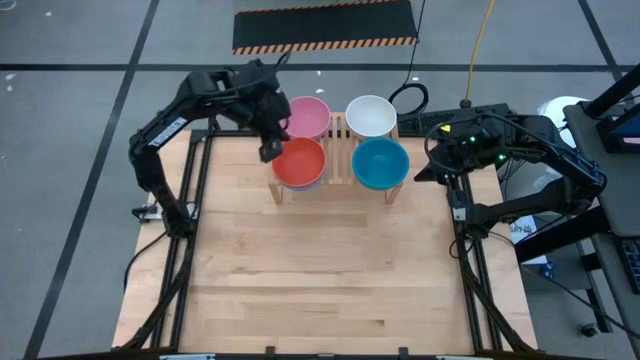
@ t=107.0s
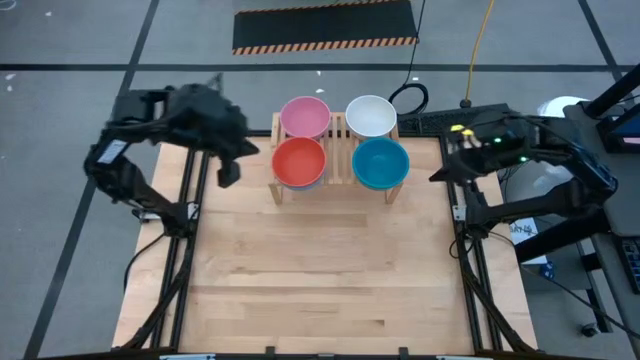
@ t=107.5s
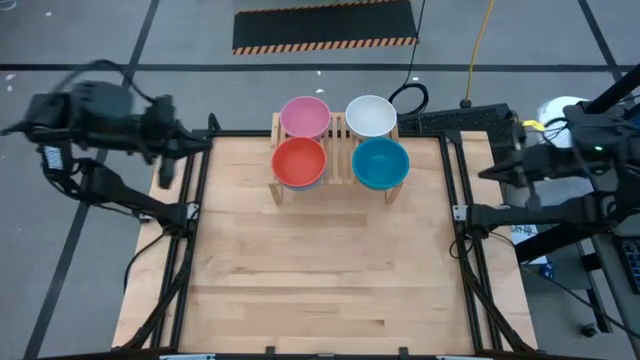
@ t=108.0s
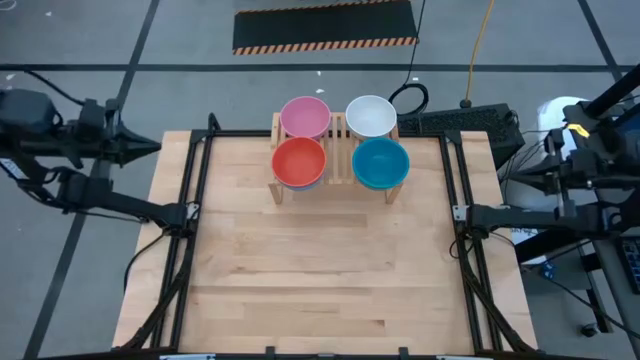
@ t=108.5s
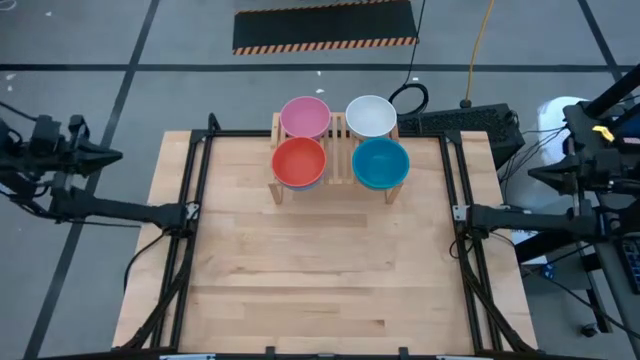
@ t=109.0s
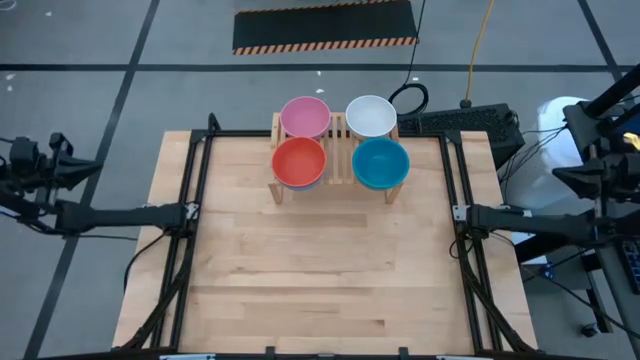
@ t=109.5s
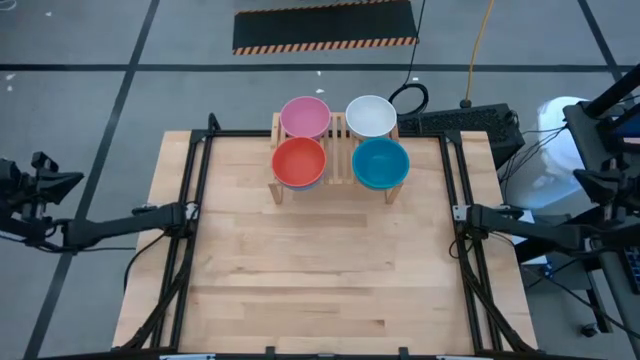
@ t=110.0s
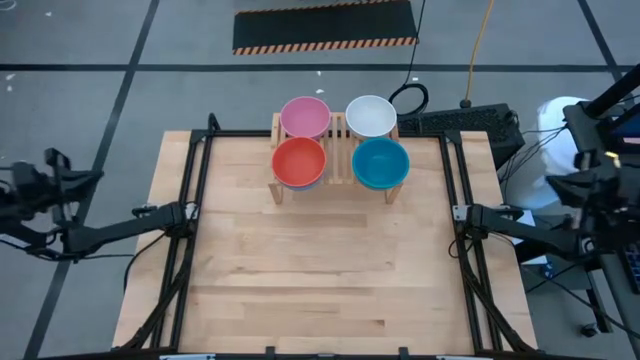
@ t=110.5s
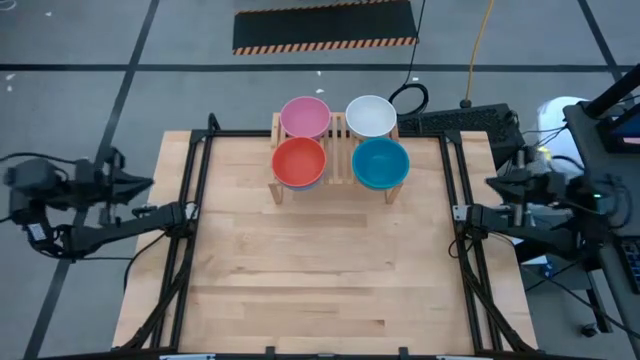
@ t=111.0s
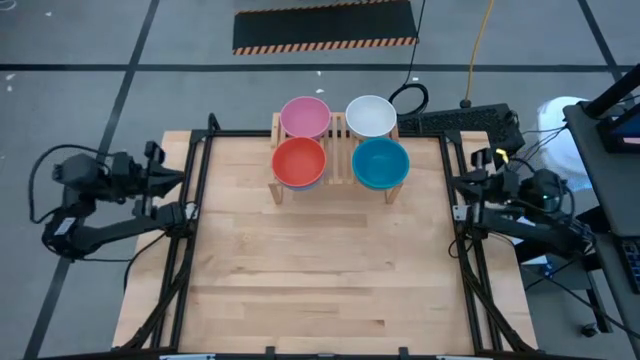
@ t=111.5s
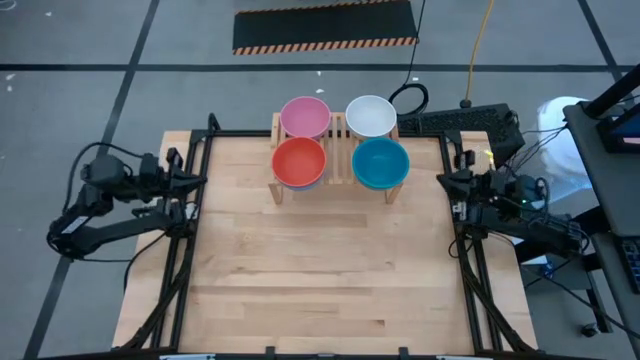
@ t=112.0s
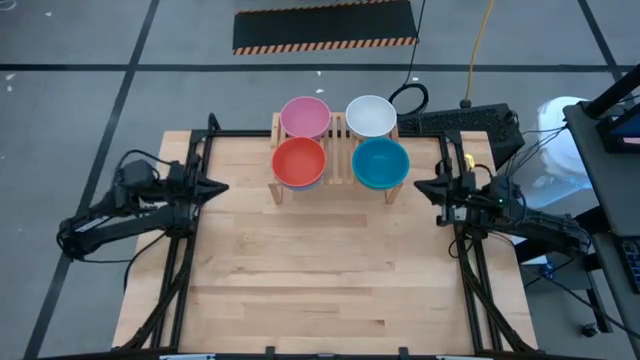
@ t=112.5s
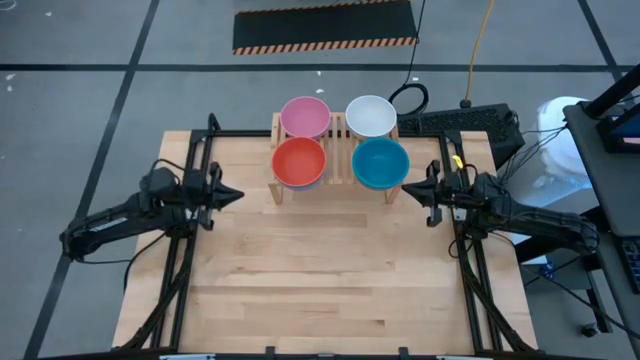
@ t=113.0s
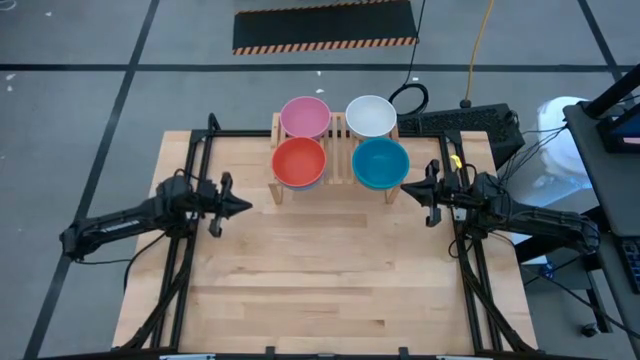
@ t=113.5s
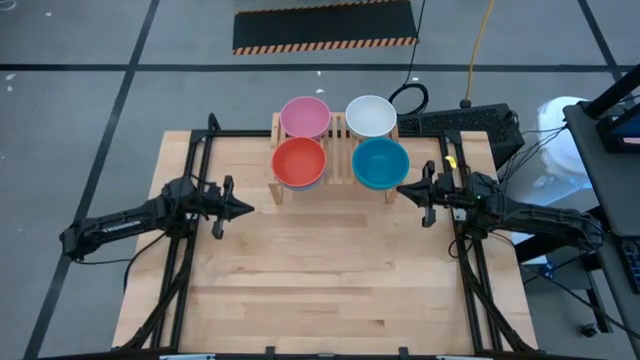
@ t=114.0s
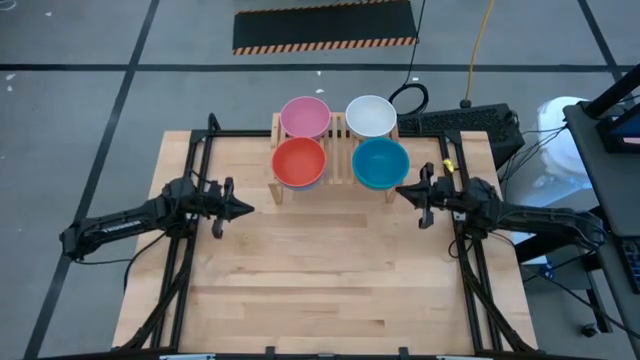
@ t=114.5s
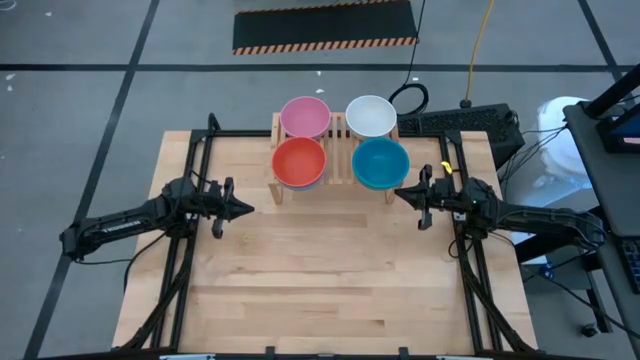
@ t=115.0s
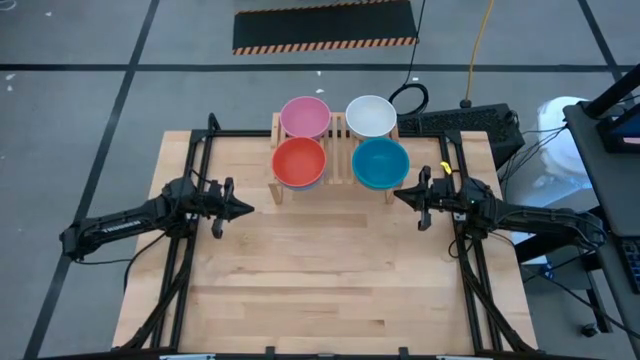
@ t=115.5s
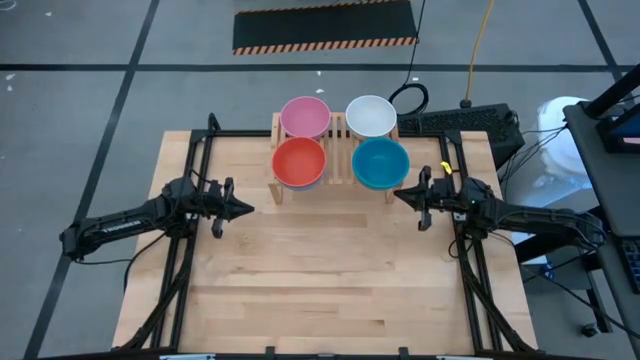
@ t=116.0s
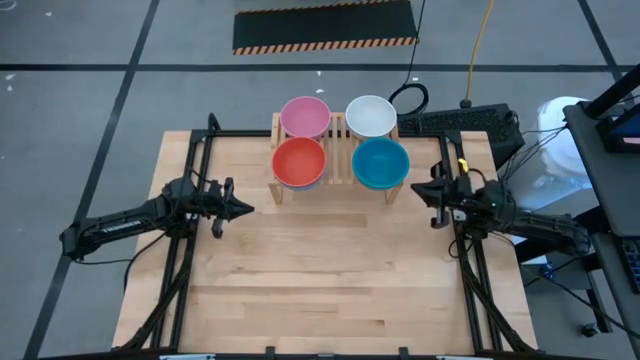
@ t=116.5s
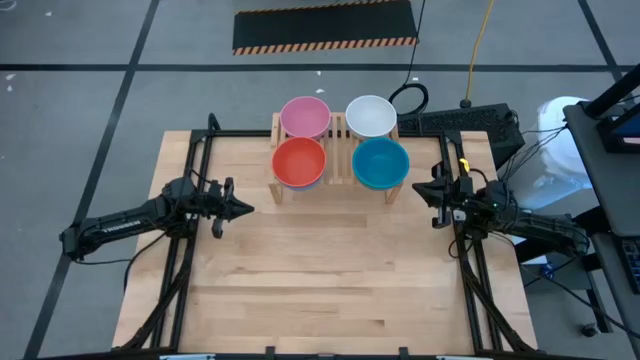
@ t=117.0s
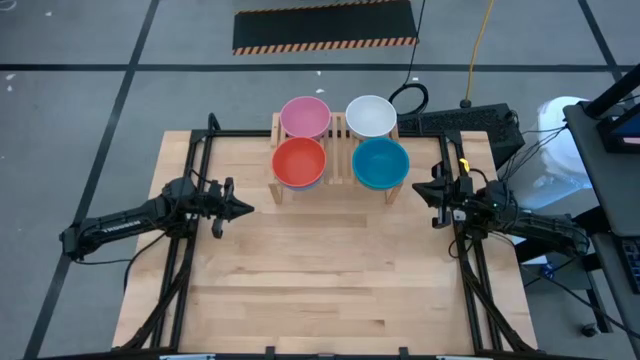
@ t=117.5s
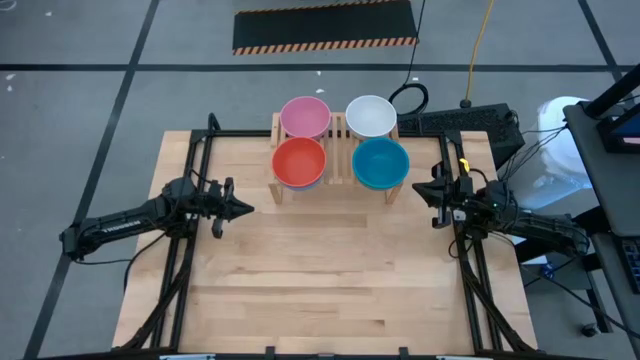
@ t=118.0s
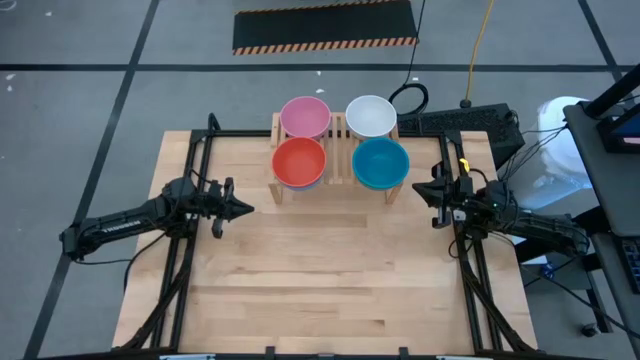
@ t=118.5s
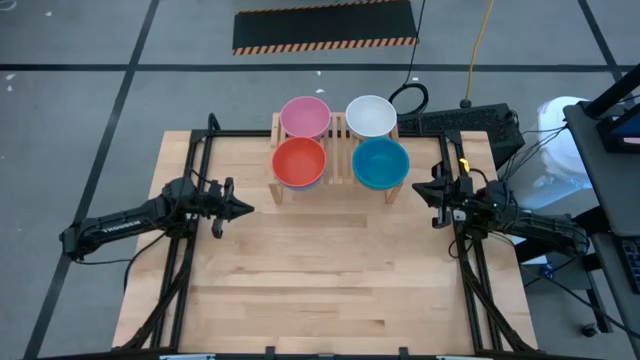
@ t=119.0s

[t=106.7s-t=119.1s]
Task: Place and stack bowls onto a shelf
Return to Home Position

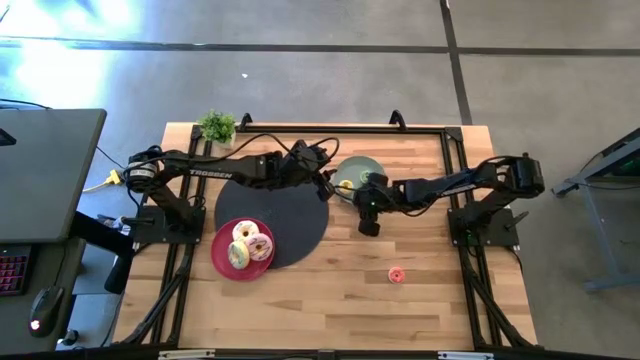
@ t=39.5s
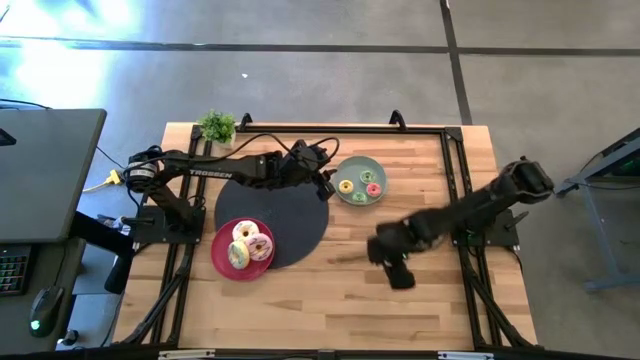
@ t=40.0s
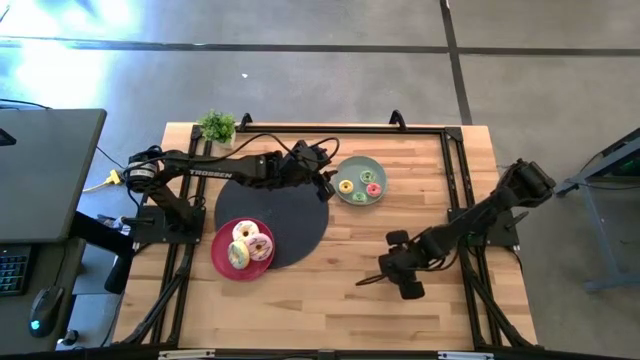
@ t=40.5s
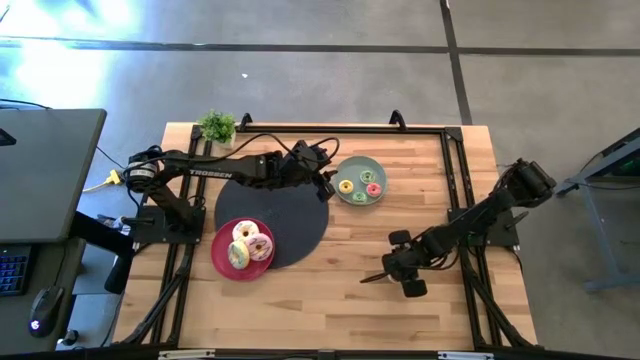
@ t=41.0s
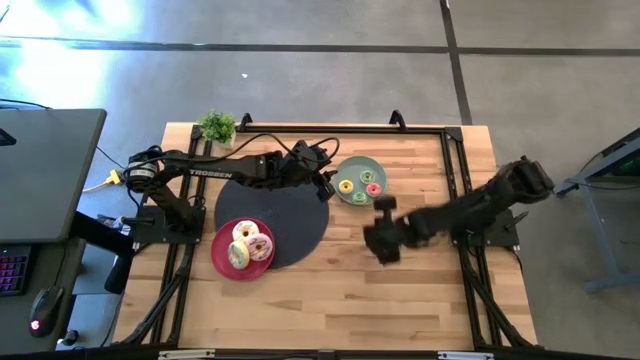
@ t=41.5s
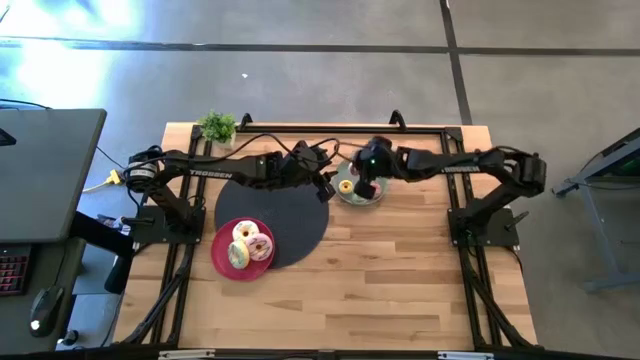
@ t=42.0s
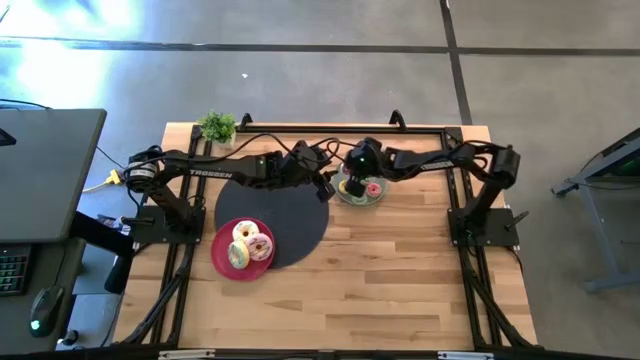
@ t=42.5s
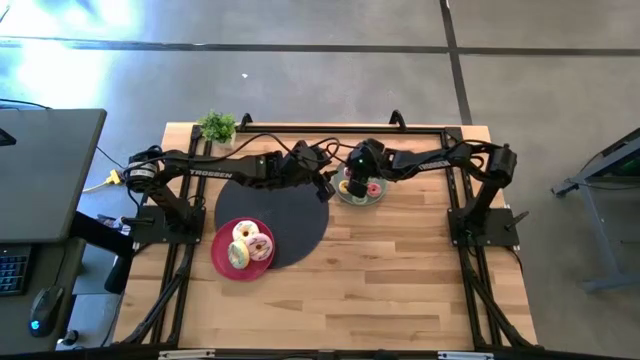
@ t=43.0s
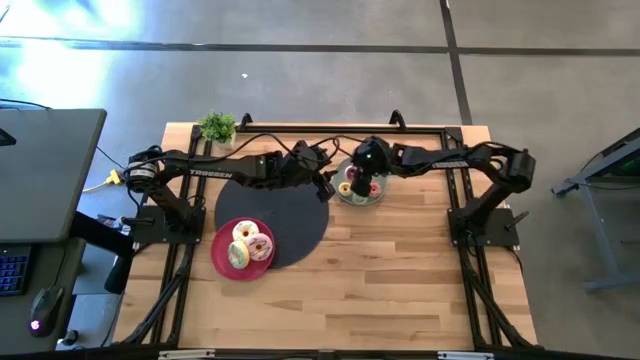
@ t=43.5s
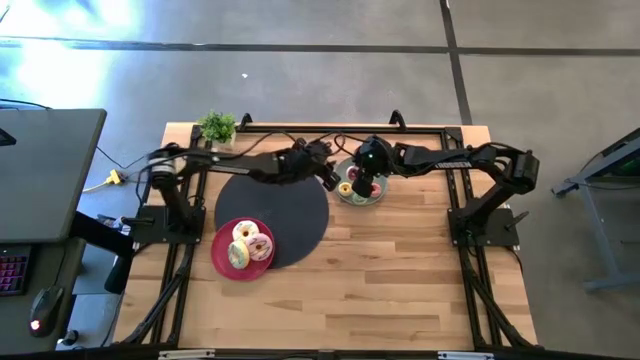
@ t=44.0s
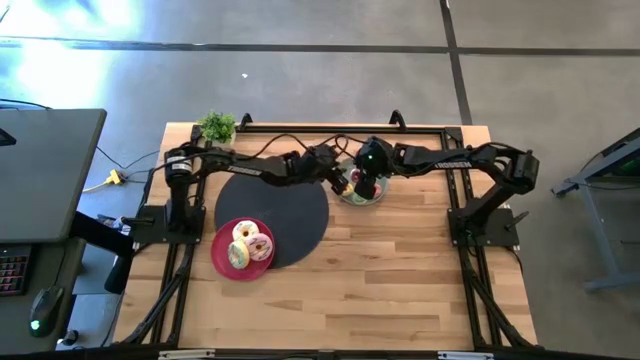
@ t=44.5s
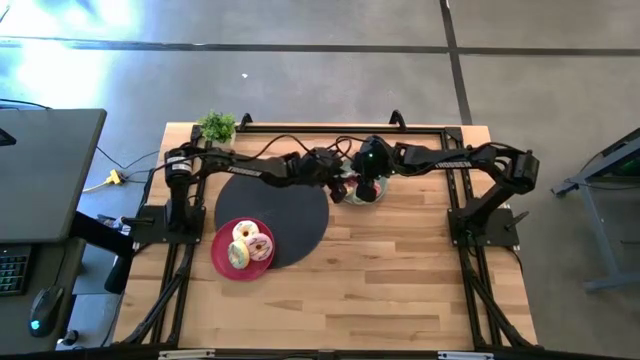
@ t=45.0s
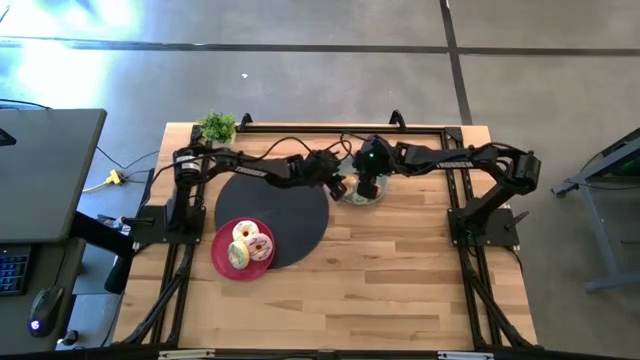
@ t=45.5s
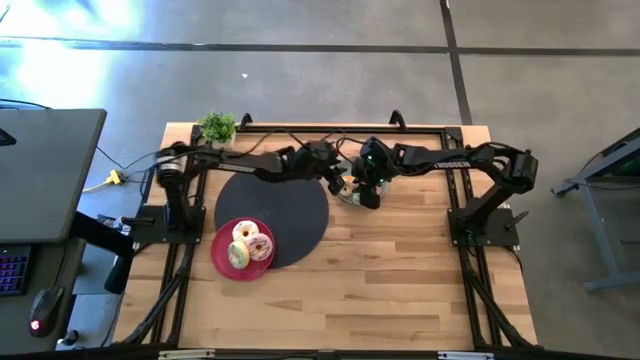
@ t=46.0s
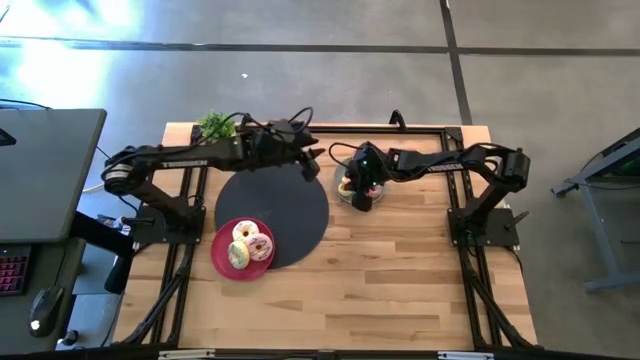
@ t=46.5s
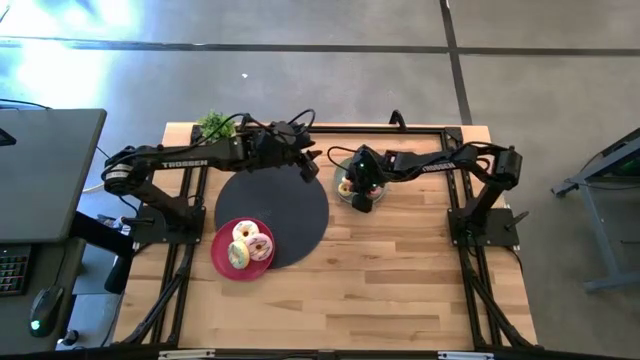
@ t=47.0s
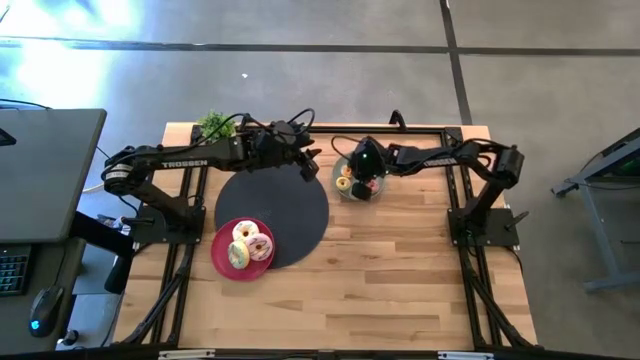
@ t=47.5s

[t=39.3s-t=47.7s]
Task: Pick & Place donuts
Put the small pink donut on the gray plate
